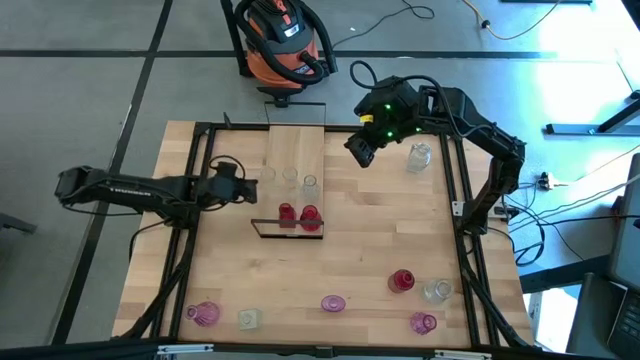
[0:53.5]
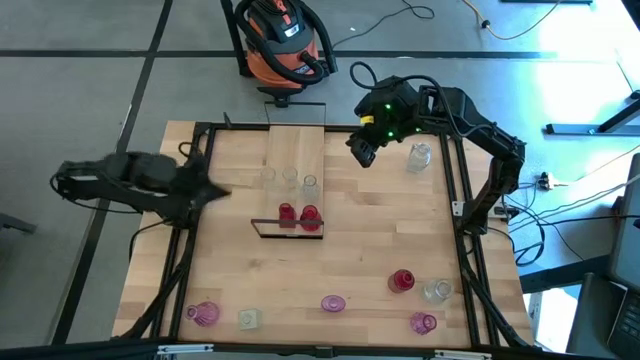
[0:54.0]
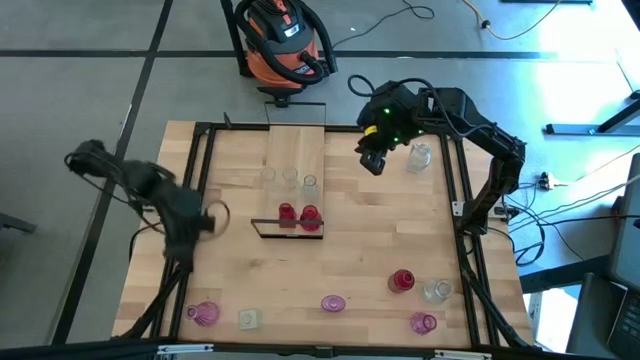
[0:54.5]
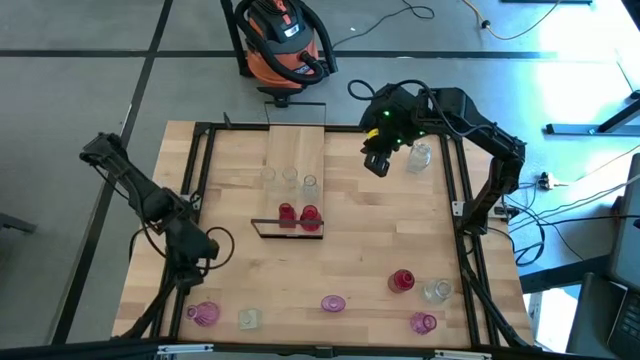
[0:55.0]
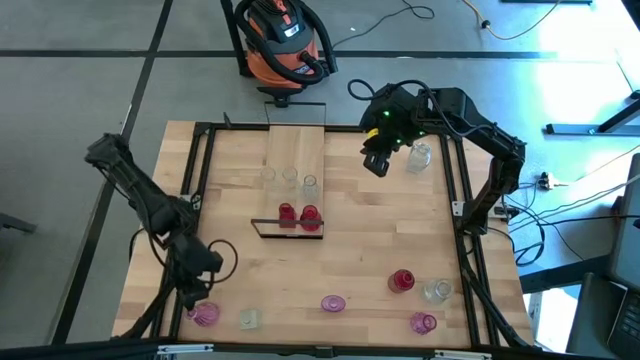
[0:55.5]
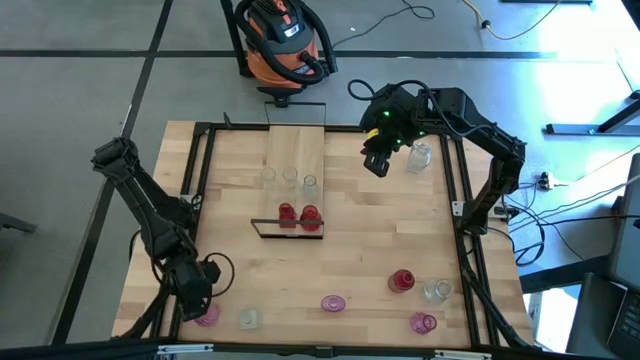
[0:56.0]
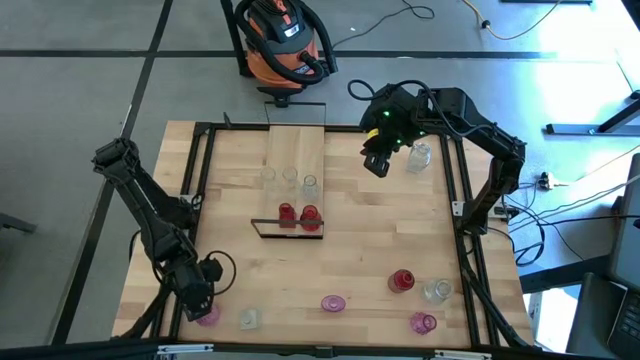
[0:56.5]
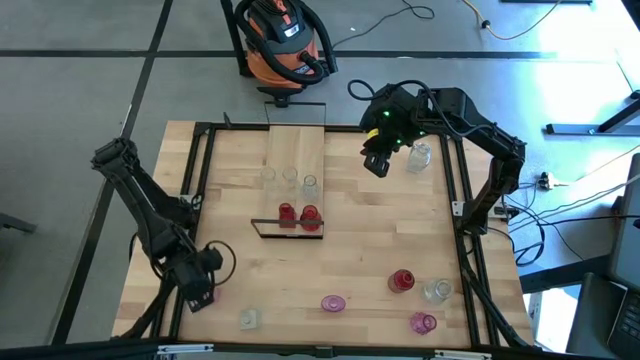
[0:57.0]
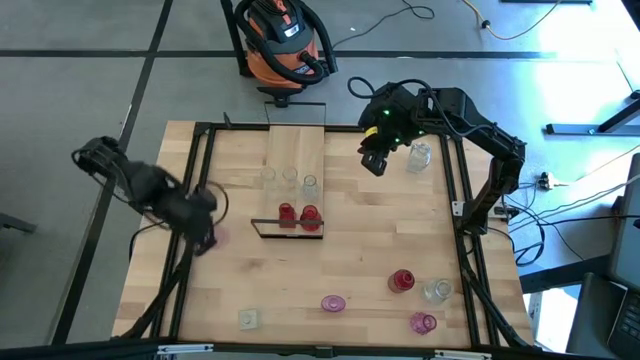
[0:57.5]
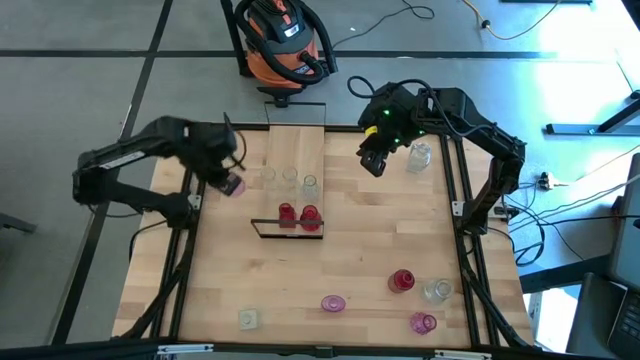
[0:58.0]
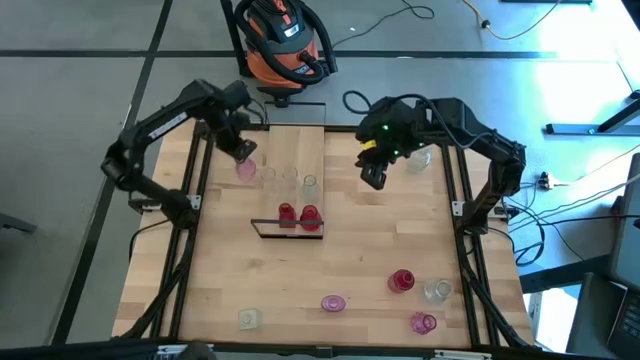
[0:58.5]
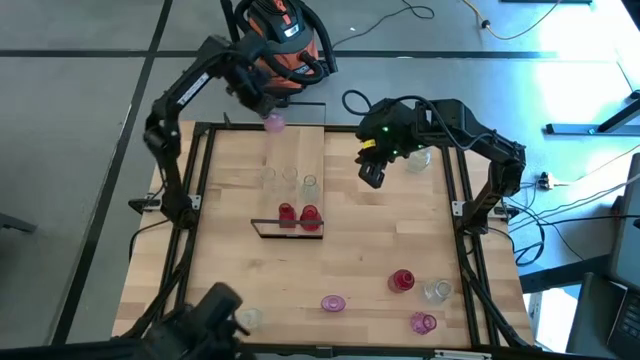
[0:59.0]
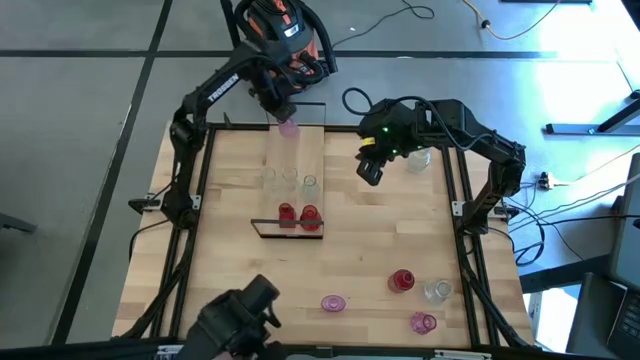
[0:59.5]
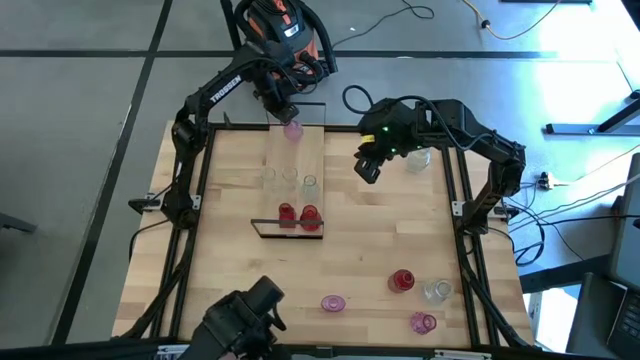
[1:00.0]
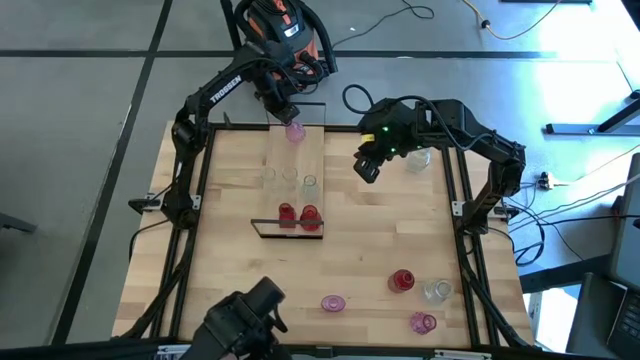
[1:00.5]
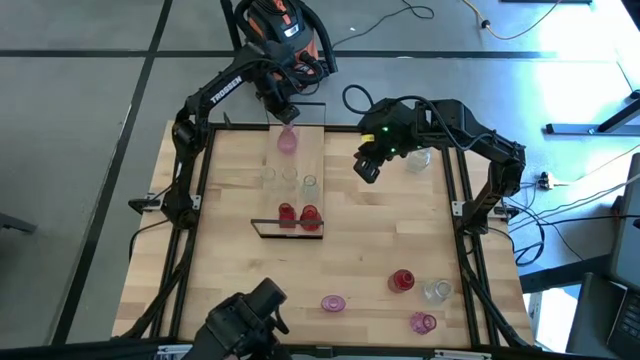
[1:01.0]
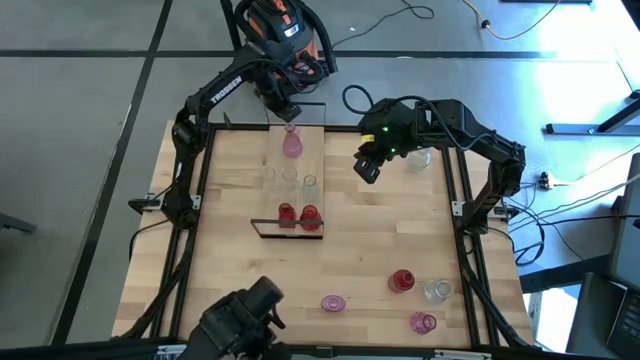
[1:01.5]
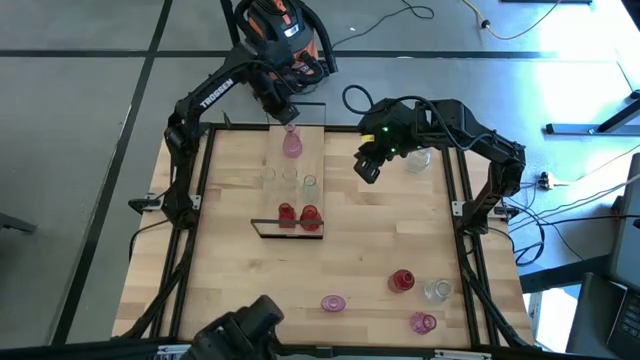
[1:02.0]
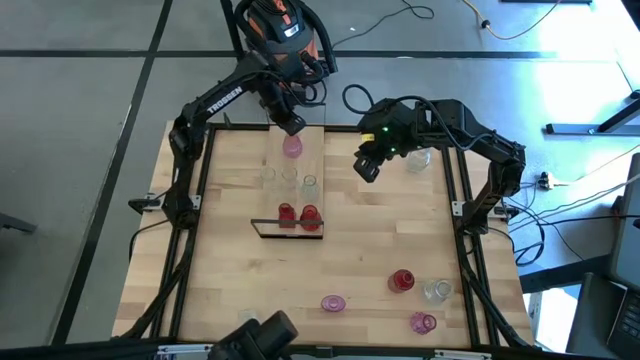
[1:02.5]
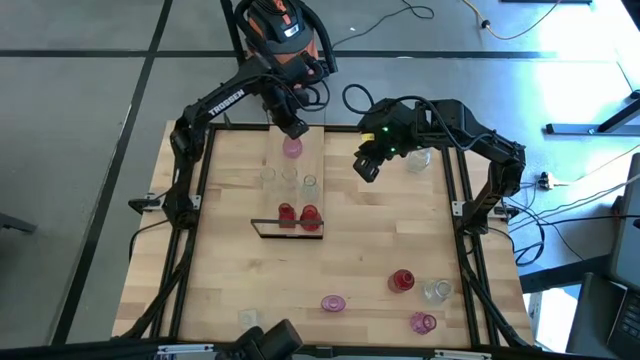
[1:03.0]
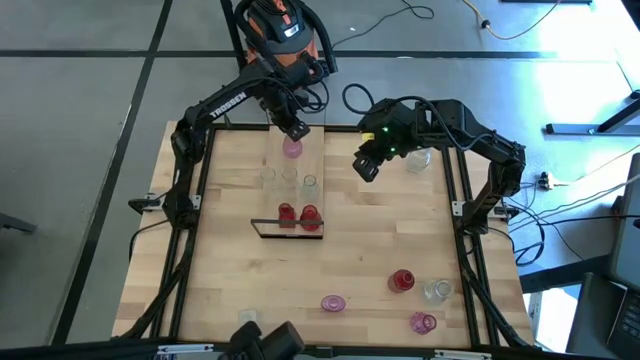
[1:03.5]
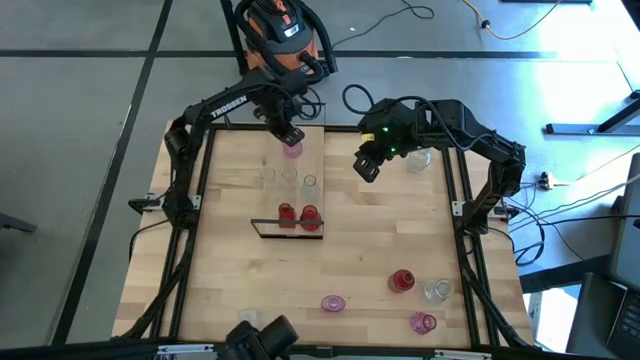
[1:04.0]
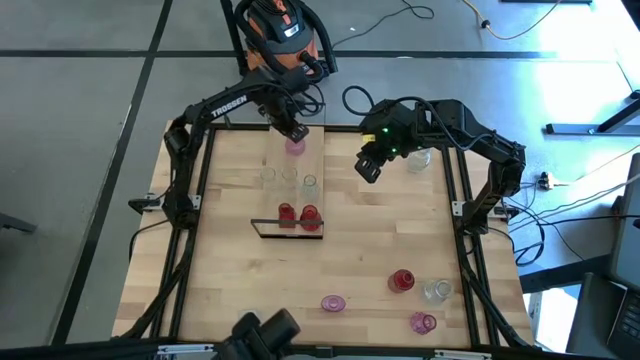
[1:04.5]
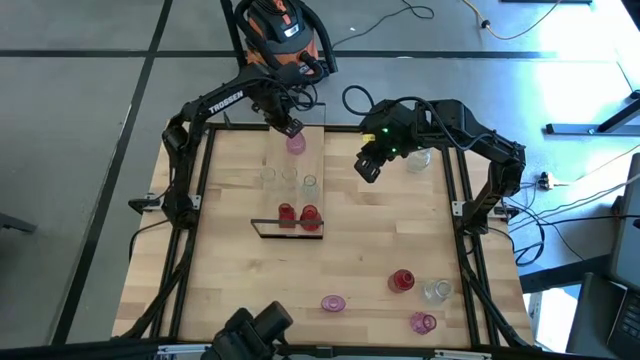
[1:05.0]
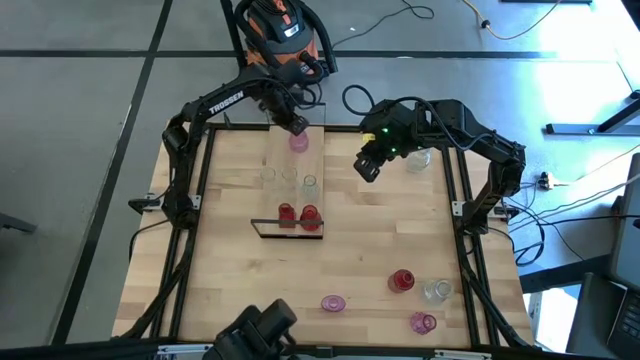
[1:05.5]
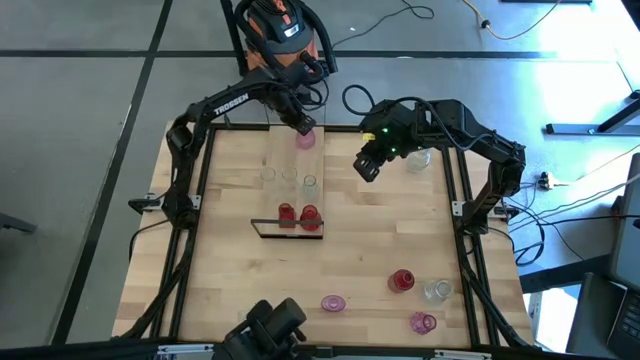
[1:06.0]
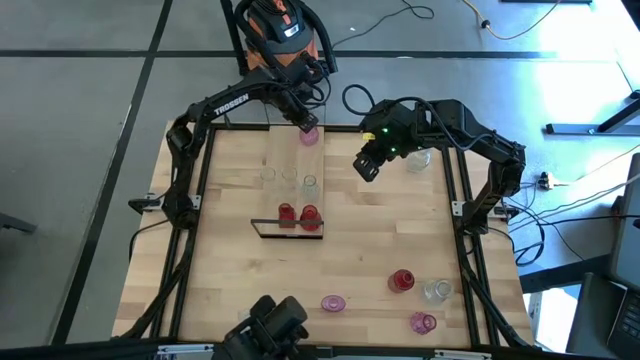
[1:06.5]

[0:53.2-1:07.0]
Task: sort vases onto shelf
Put the purple vase on the shelf

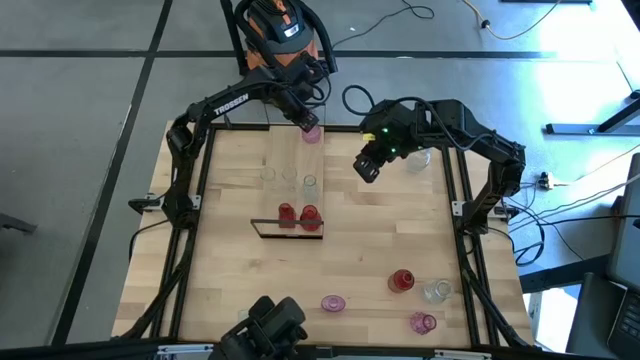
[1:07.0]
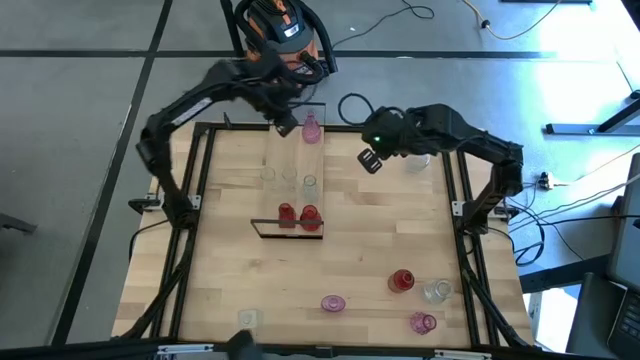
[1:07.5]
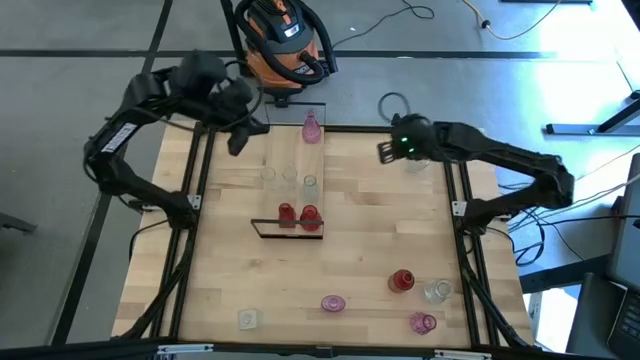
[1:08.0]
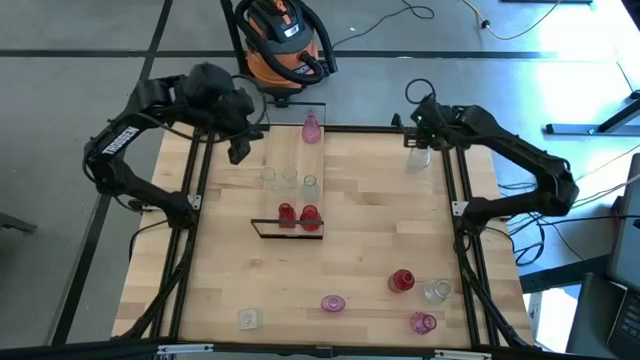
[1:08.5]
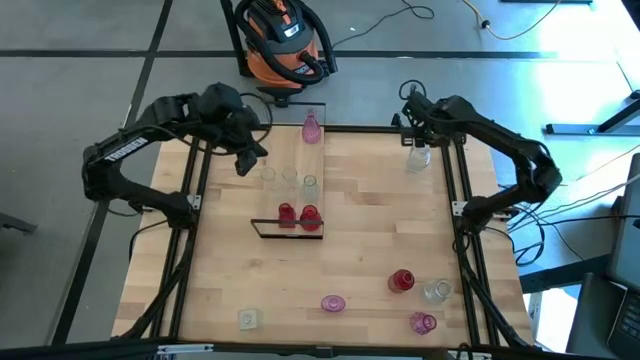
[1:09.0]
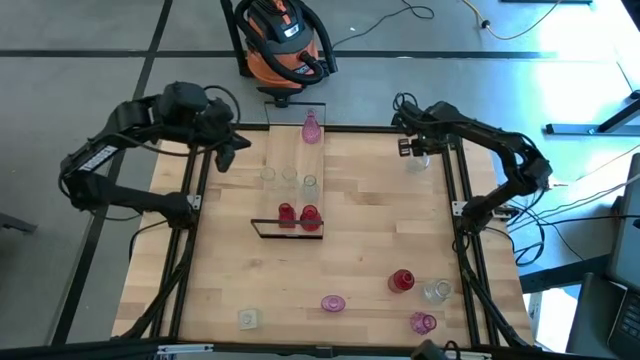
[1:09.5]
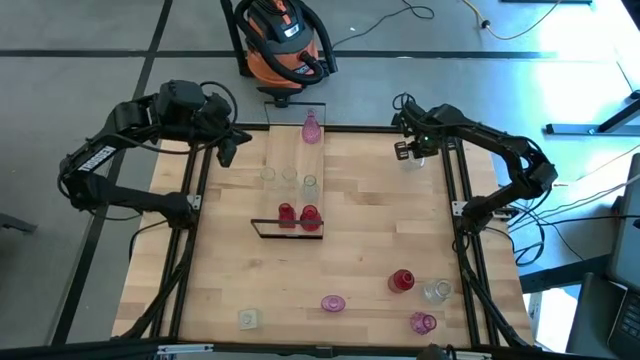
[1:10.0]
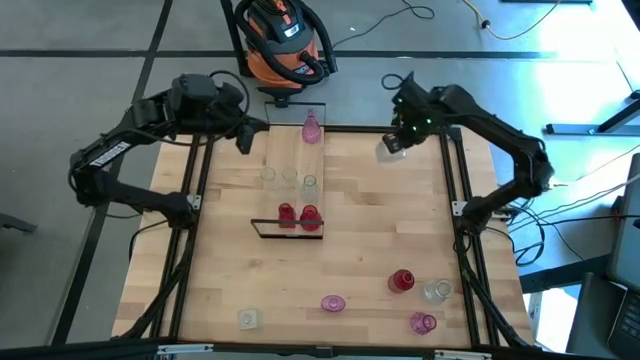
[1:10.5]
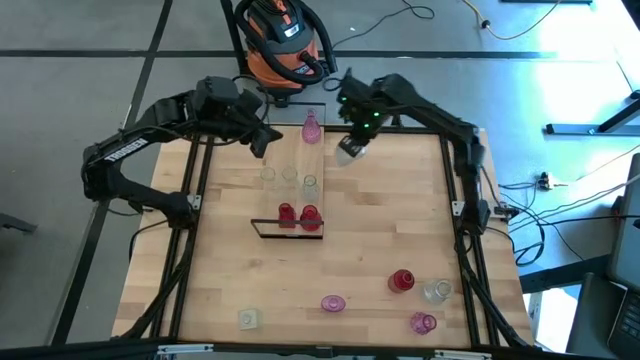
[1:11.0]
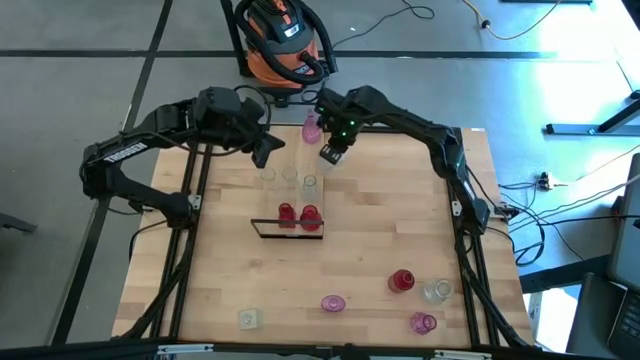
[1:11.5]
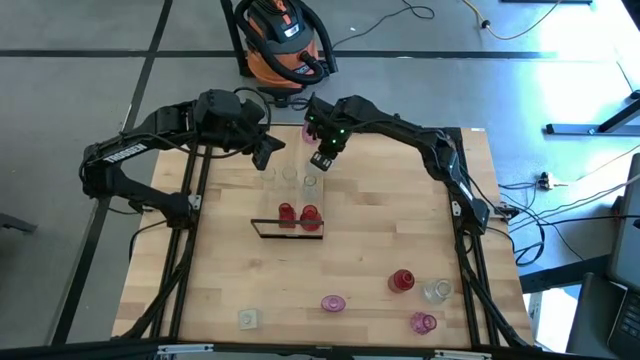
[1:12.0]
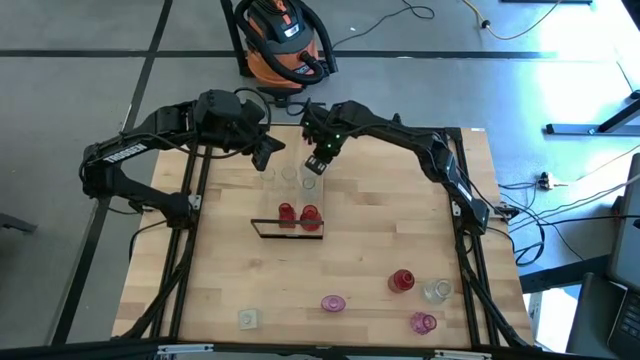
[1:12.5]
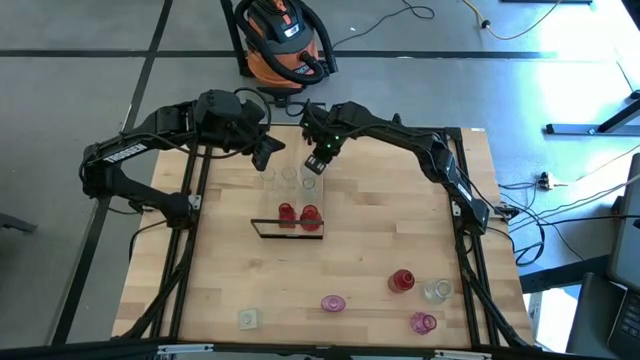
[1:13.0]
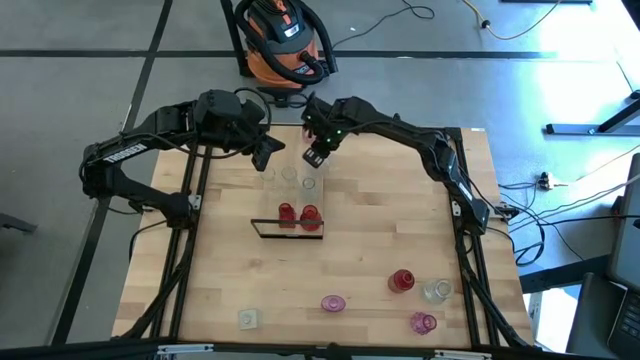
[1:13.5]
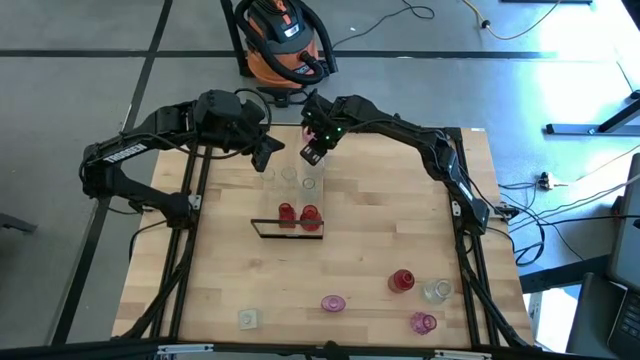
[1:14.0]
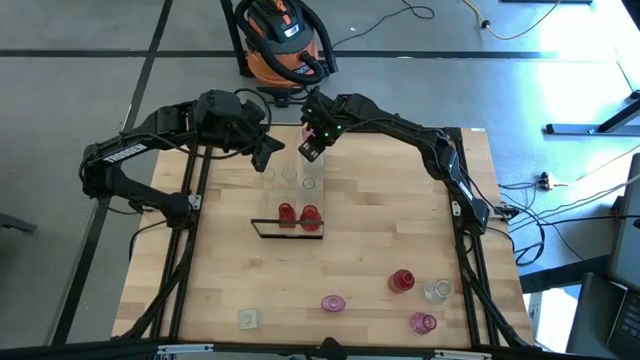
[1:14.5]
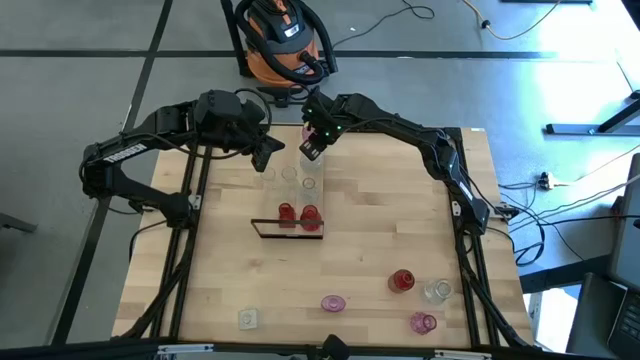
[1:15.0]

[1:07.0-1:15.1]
Put the transparent vase on the shelf
